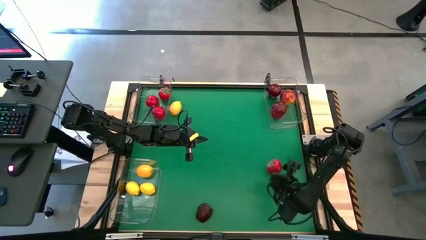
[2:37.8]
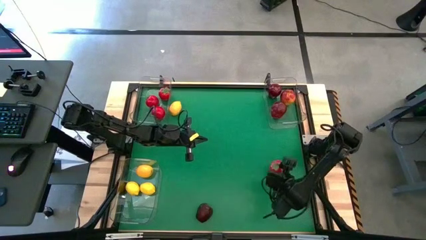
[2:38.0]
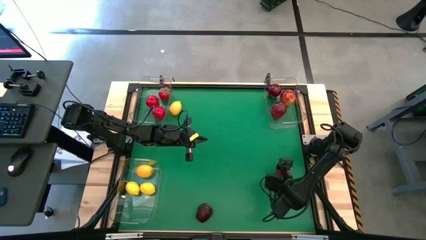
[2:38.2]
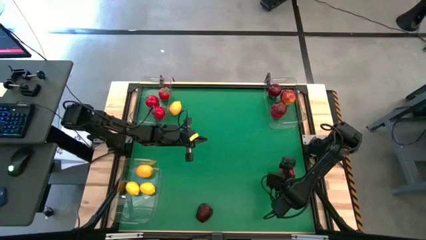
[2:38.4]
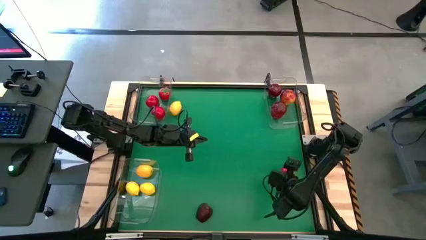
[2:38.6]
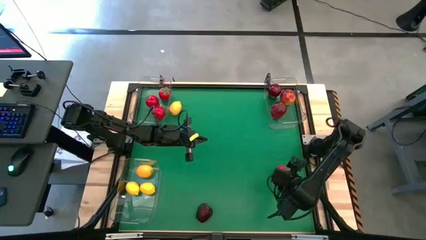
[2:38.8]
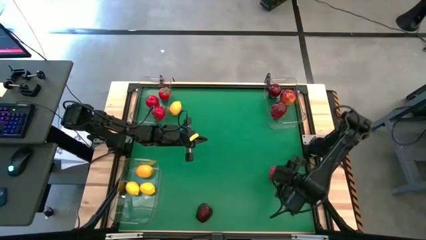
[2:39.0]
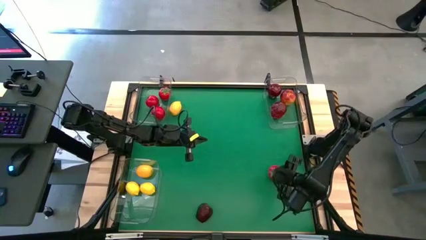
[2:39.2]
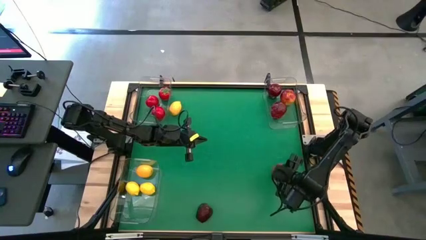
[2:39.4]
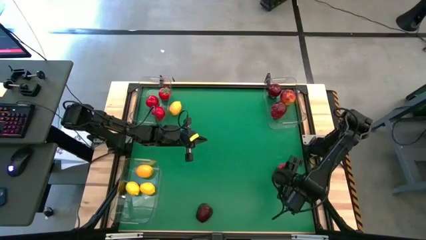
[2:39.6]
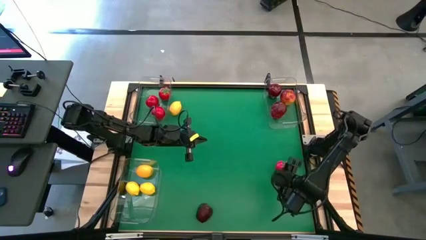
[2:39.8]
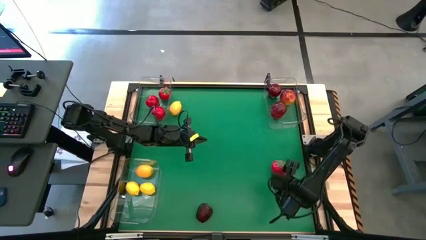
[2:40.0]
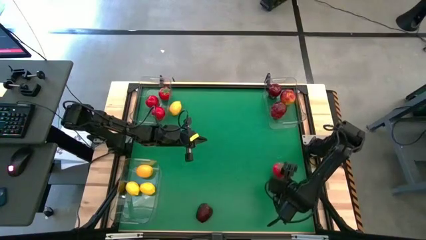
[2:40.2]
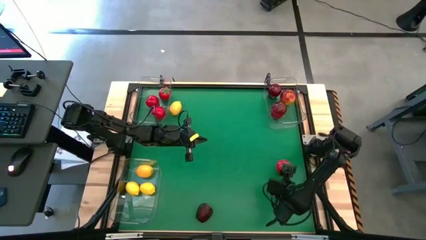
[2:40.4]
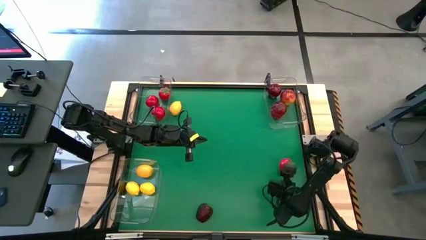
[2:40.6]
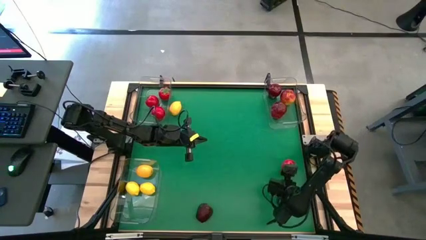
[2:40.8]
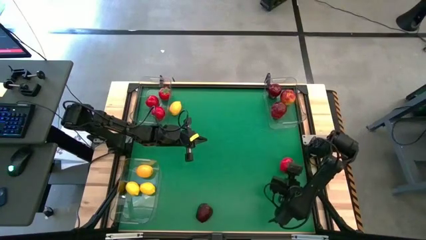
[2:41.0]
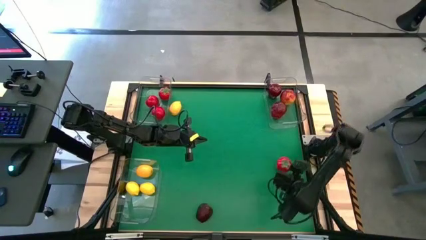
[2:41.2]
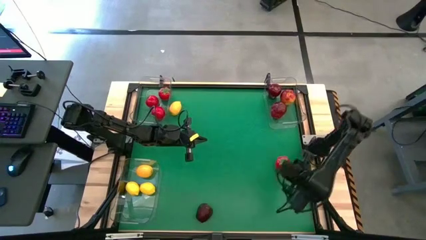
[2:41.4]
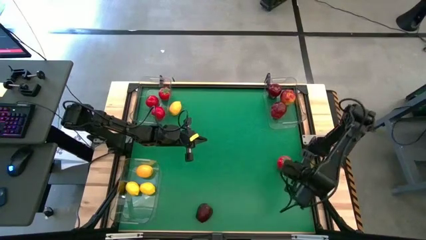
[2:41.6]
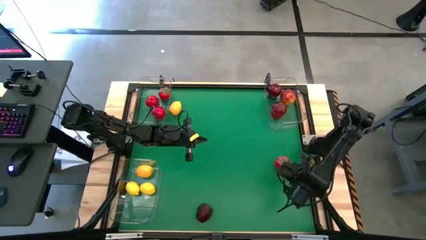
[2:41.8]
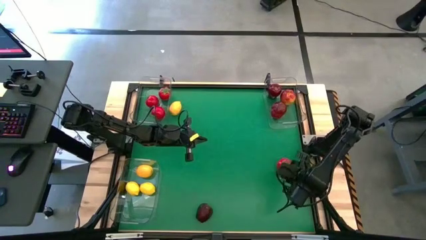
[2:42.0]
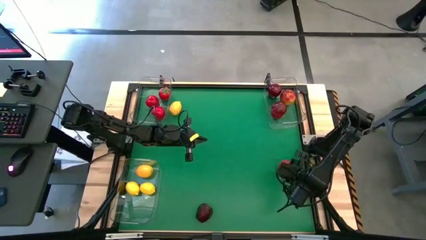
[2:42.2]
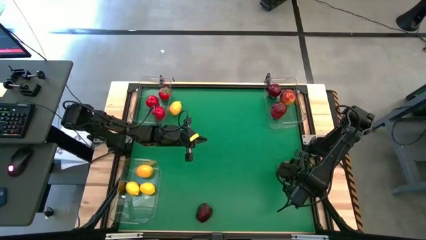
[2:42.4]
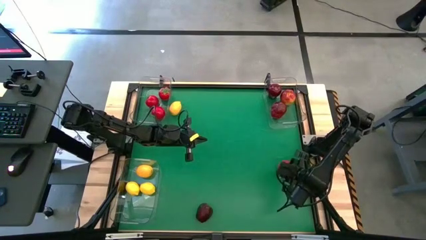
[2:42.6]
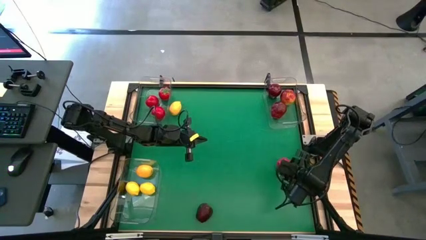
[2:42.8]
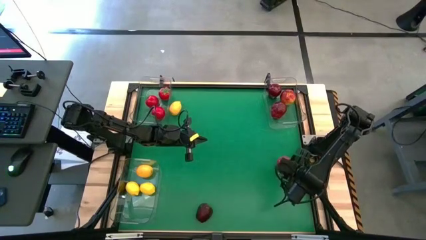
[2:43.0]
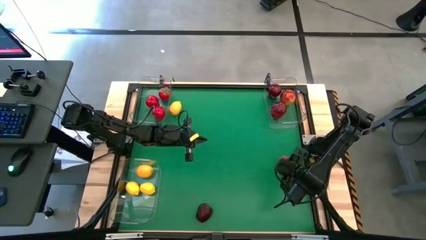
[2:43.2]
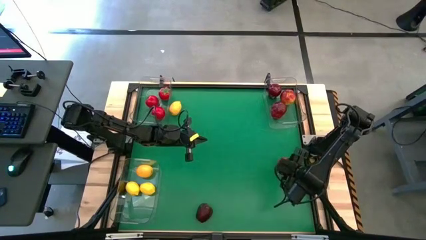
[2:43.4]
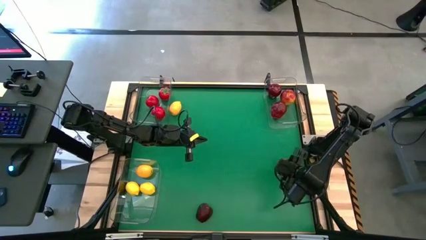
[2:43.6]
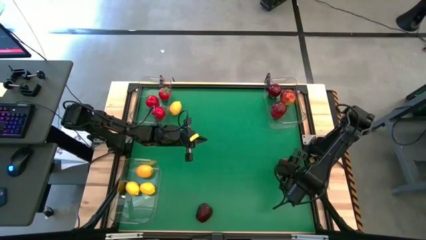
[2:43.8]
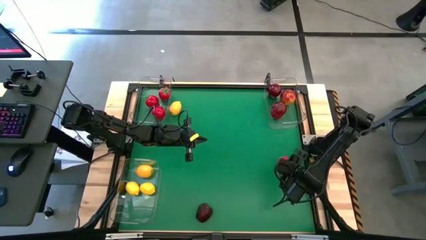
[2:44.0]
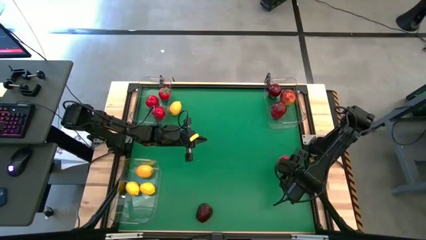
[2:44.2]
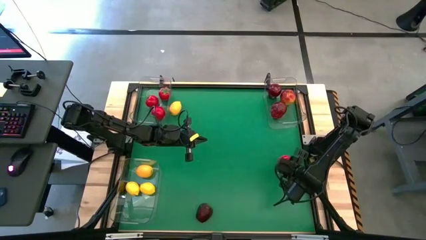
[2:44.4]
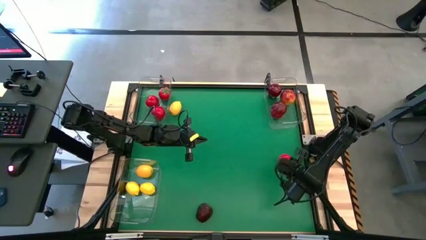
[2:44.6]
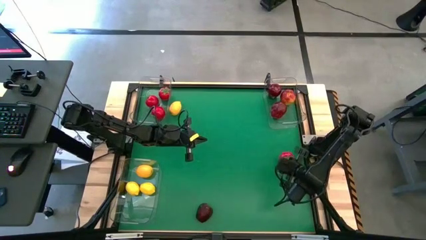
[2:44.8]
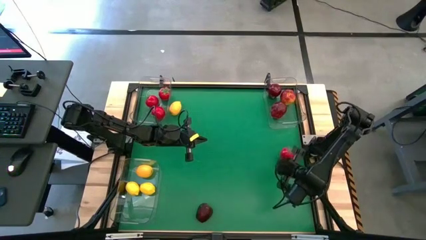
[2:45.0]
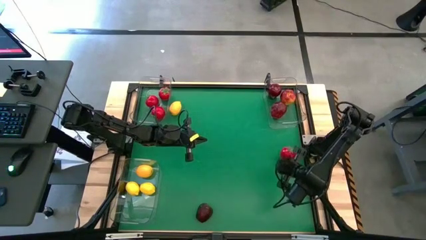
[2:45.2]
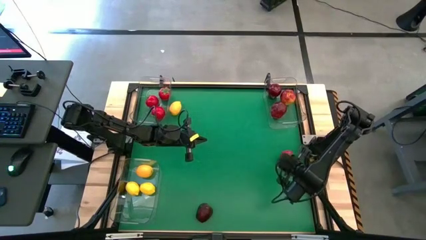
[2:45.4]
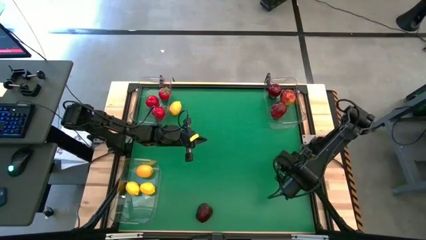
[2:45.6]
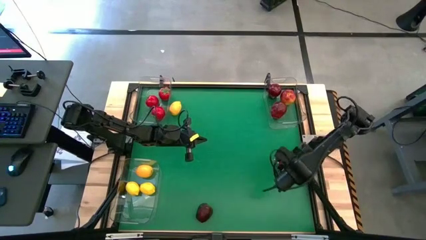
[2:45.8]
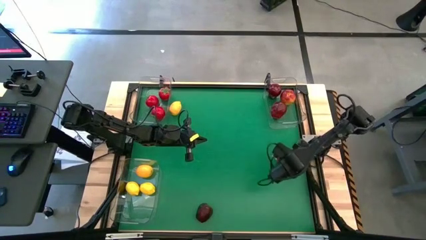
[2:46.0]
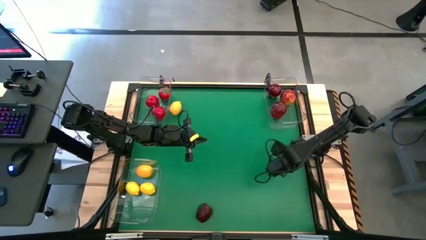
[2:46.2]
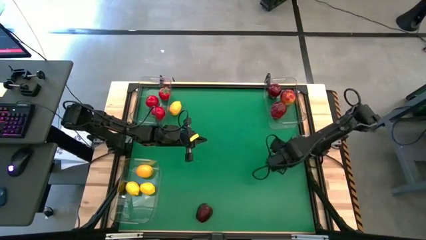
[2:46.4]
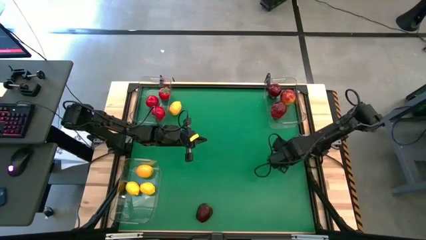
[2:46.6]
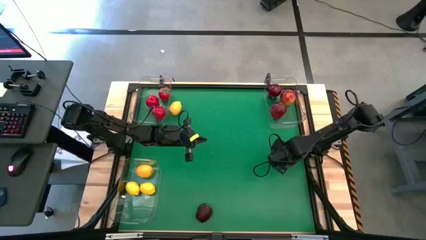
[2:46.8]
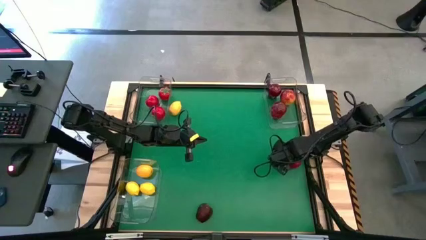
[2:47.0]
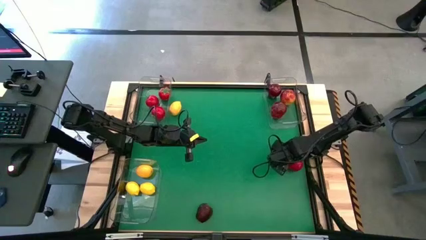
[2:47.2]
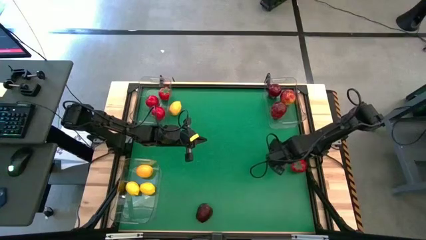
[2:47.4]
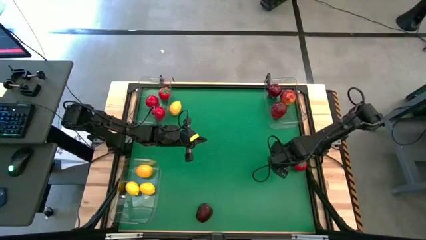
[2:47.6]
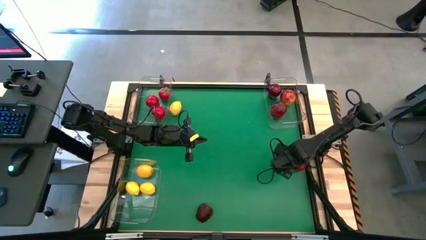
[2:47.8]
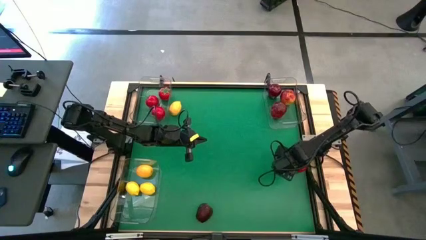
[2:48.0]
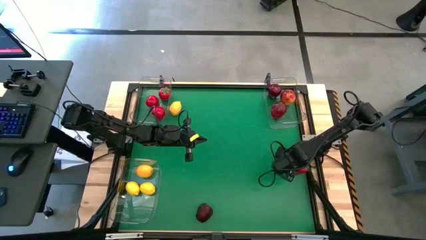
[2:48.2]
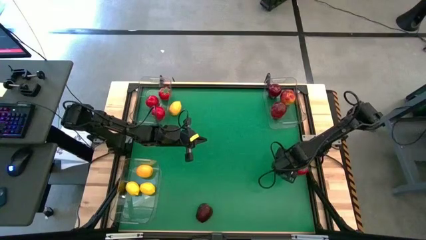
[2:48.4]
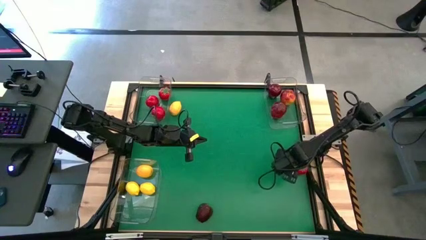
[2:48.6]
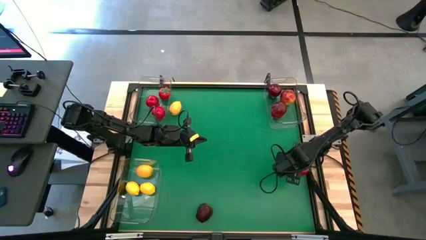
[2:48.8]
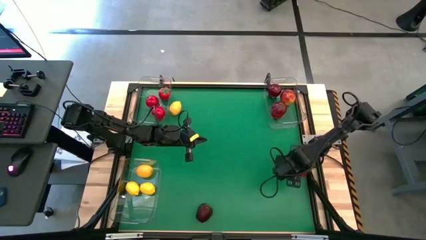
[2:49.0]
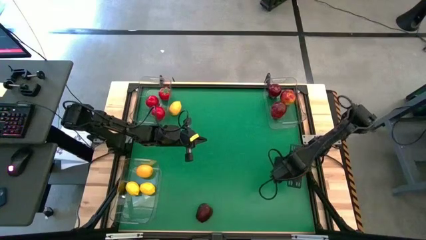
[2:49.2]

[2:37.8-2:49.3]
Task: Sort produce into baskets
Put the tomato into the top left bin

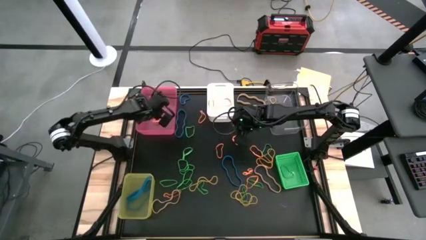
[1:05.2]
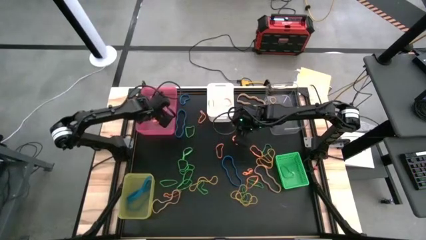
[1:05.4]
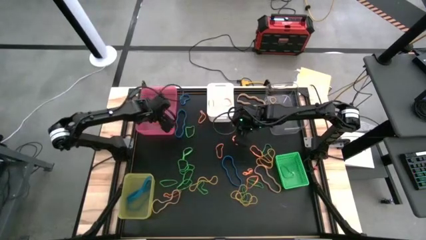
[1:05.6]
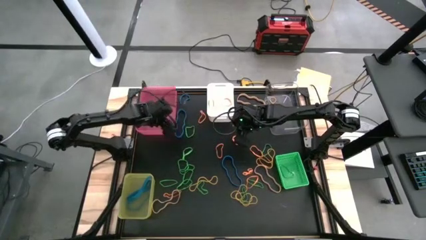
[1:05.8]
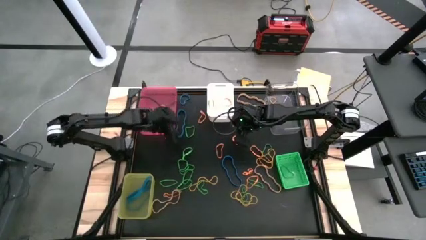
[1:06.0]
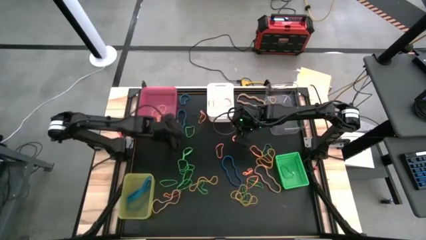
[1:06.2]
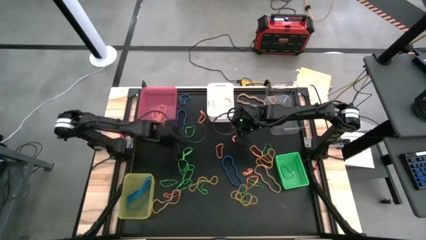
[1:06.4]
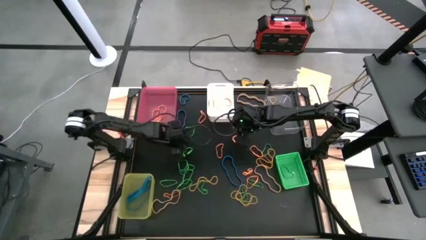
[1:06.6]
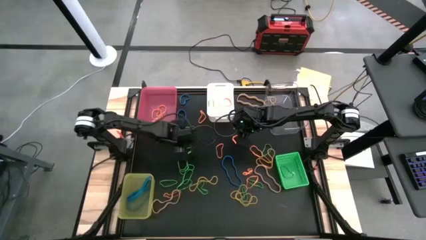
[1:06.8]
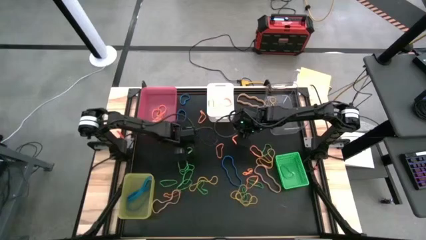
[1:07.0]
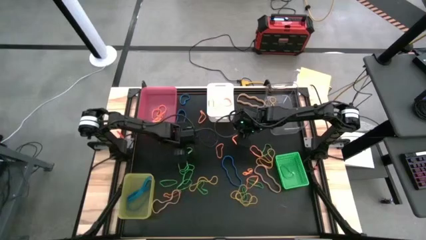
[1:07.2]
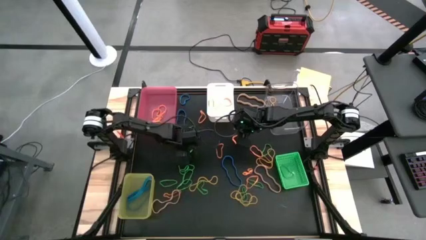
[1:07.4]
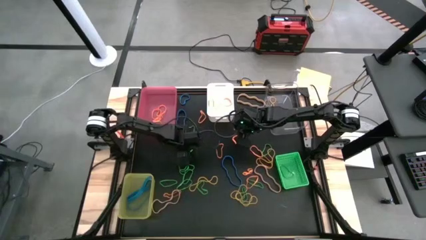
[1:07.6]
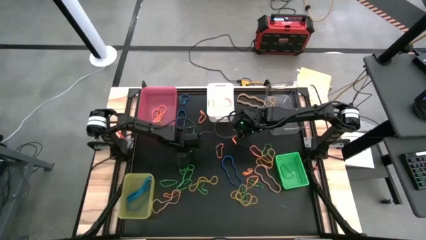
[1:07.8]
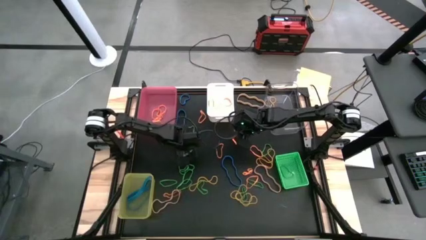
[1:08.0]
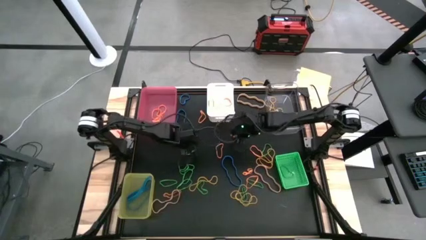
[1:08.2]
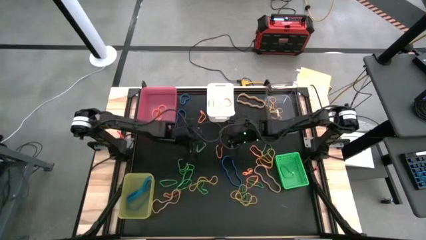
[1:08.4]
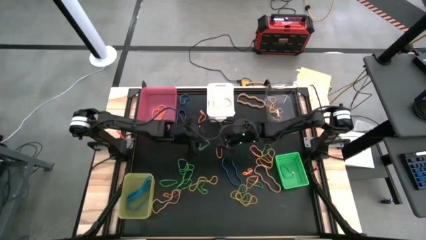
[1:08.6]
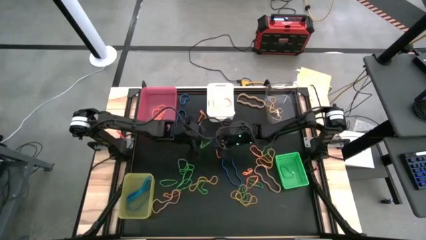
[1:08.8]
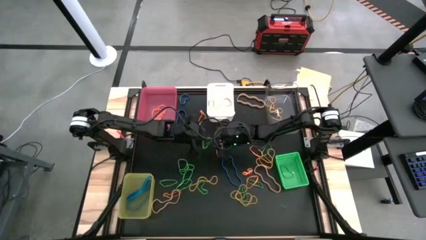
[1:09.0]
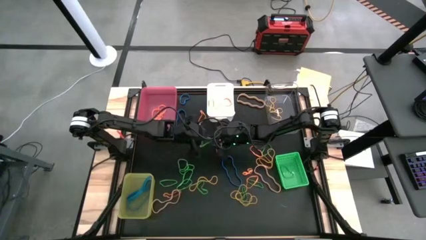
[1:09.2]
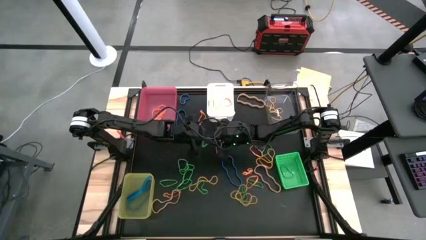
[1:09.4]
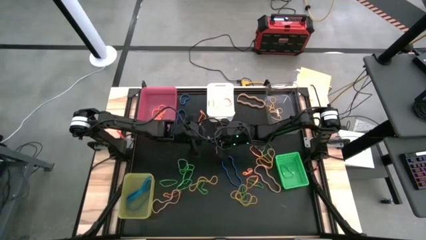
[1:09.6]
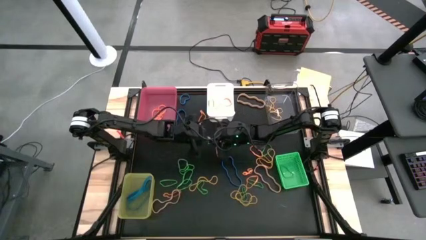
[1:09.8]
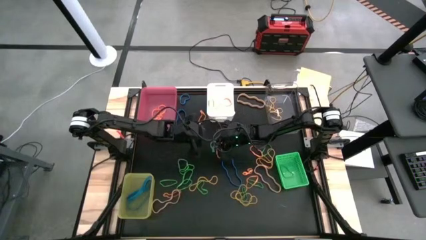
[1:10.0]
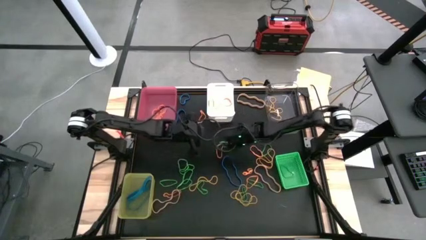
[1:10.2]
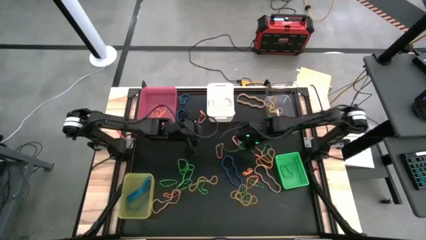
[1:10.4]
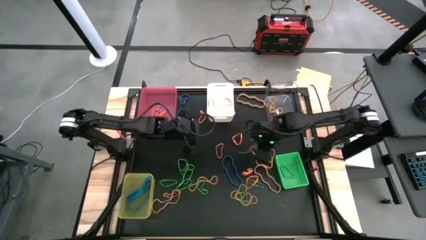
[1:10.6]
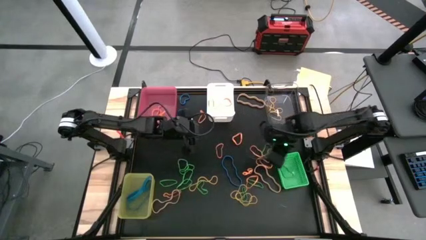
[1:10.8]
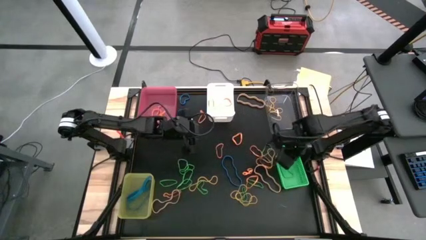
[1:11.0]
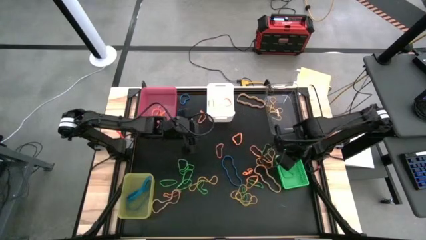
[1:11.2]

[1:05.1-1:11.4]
Task: Sort rubber bands into baskets
Put the green rubber band into the green bin
